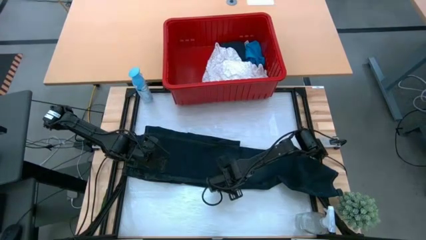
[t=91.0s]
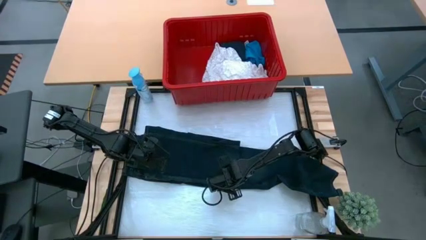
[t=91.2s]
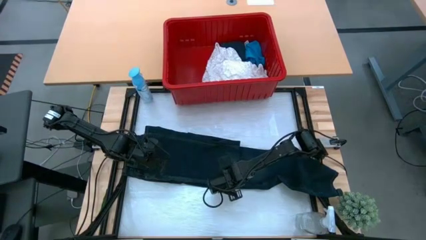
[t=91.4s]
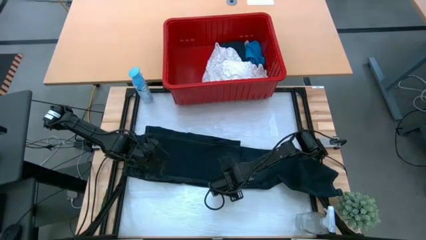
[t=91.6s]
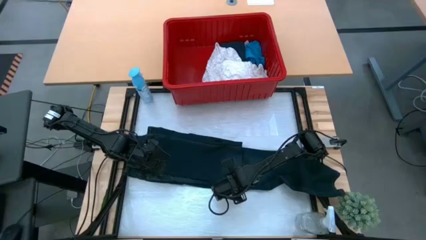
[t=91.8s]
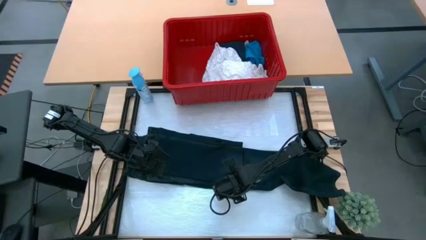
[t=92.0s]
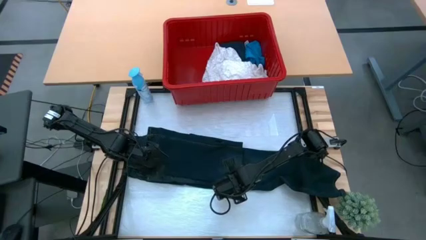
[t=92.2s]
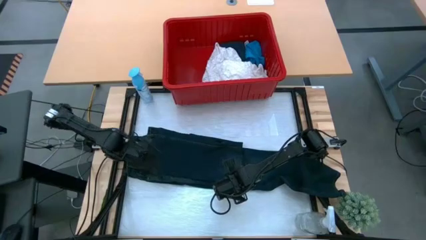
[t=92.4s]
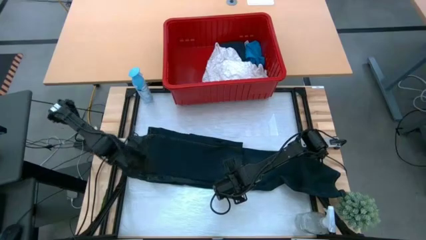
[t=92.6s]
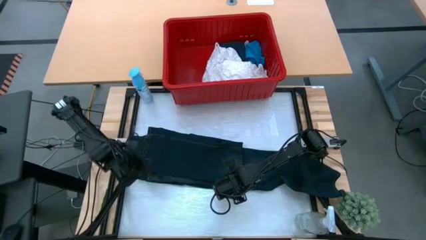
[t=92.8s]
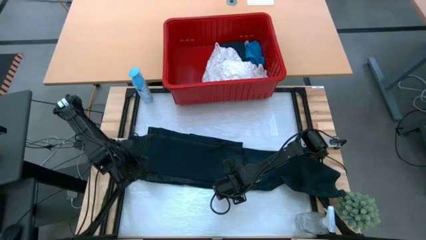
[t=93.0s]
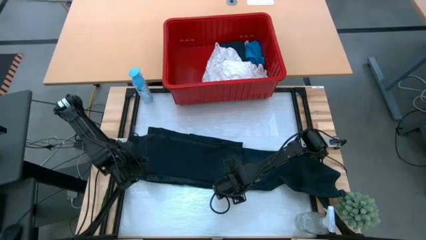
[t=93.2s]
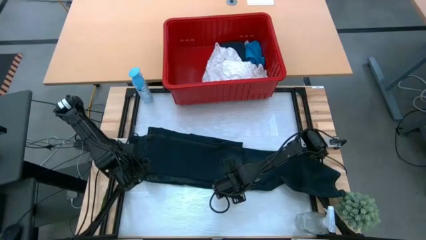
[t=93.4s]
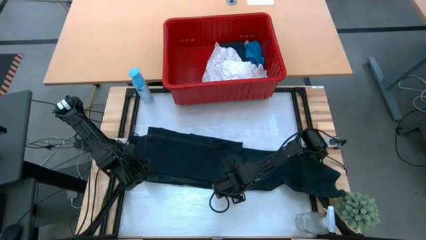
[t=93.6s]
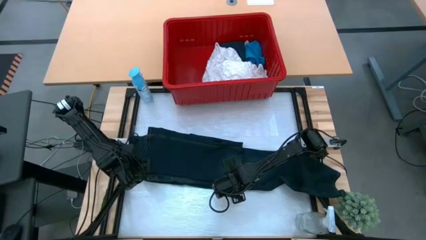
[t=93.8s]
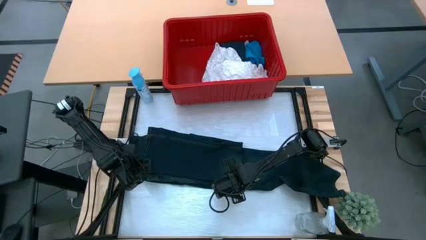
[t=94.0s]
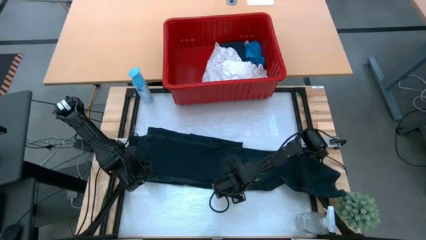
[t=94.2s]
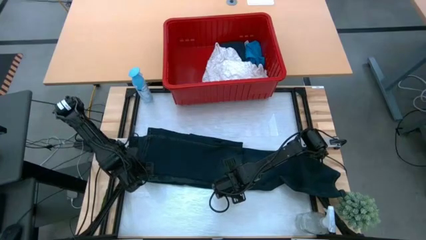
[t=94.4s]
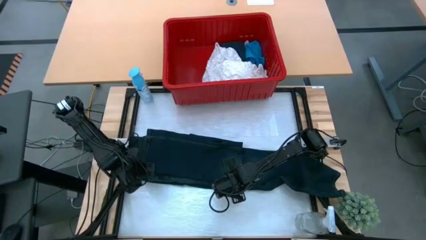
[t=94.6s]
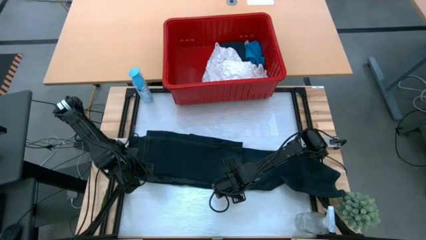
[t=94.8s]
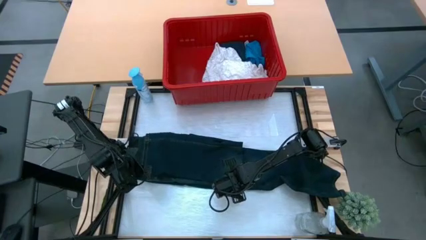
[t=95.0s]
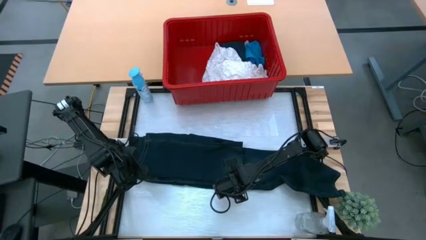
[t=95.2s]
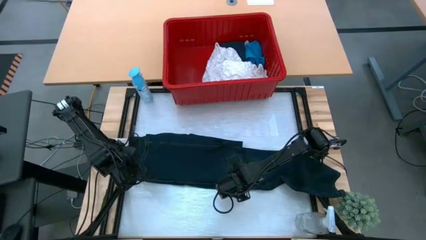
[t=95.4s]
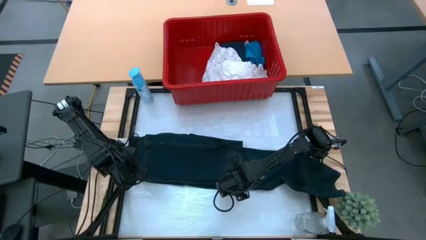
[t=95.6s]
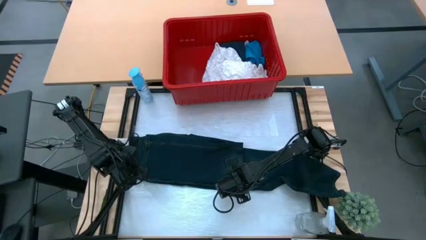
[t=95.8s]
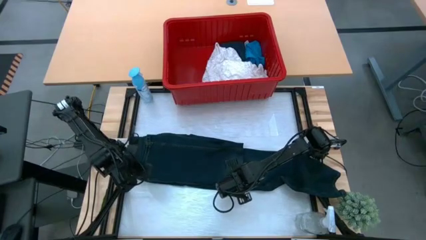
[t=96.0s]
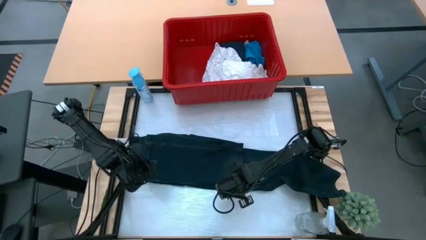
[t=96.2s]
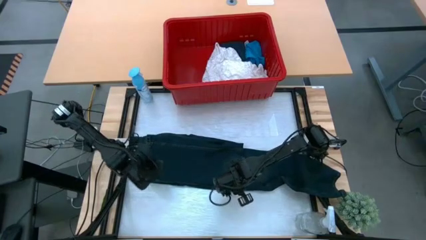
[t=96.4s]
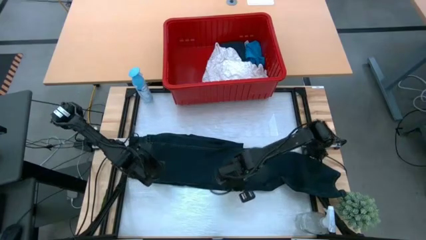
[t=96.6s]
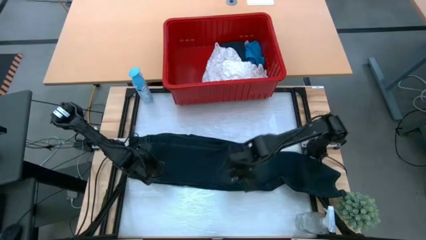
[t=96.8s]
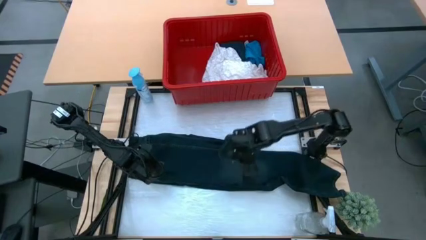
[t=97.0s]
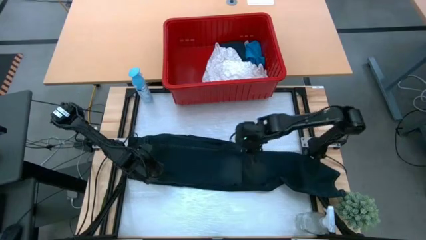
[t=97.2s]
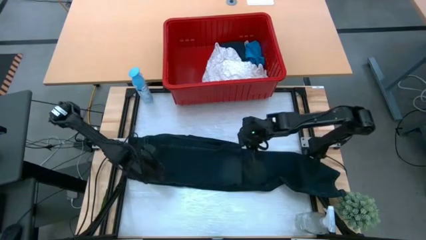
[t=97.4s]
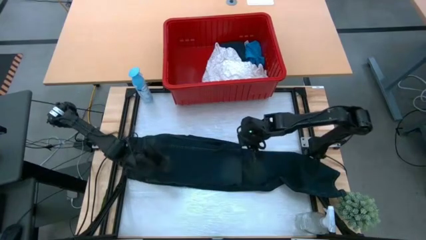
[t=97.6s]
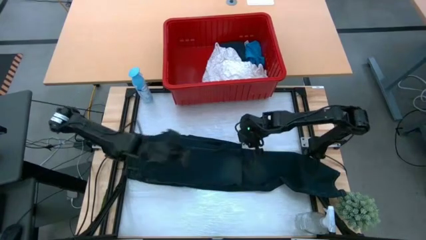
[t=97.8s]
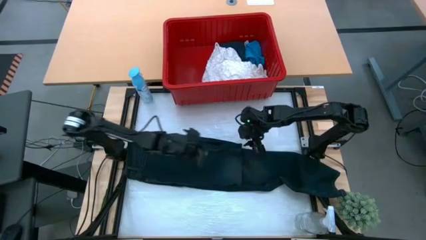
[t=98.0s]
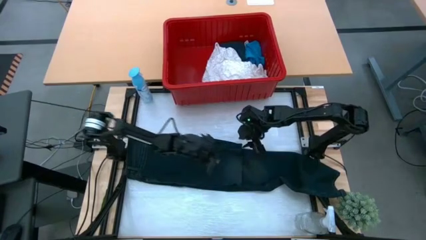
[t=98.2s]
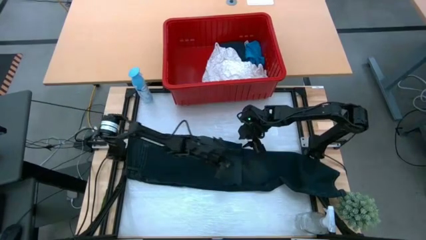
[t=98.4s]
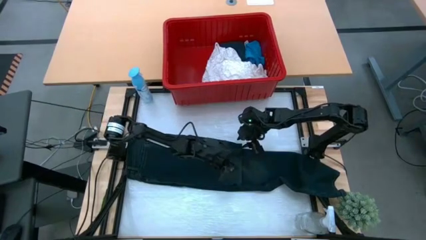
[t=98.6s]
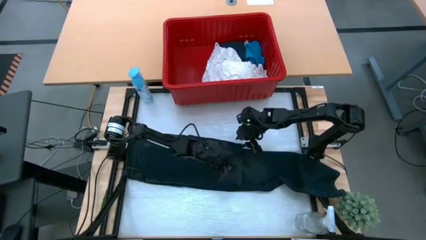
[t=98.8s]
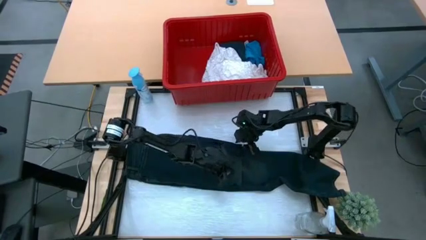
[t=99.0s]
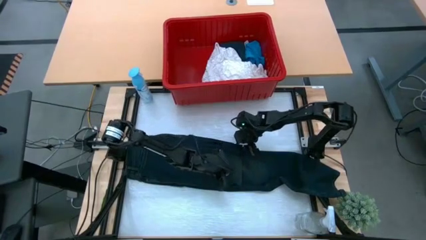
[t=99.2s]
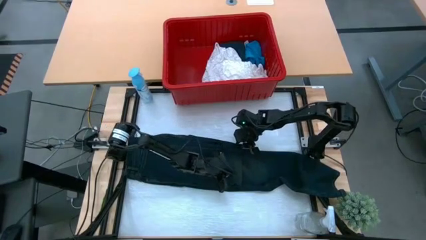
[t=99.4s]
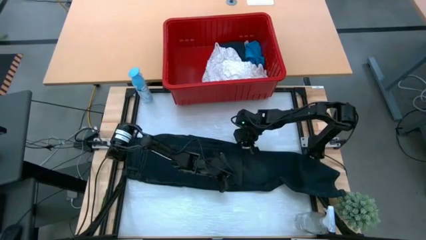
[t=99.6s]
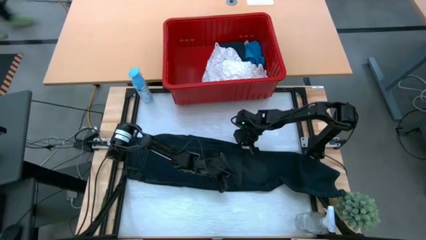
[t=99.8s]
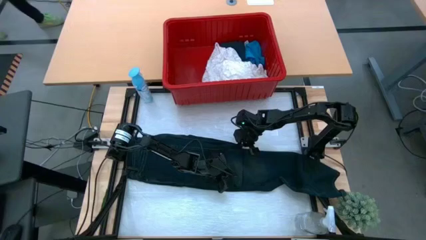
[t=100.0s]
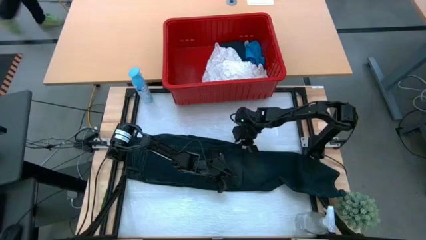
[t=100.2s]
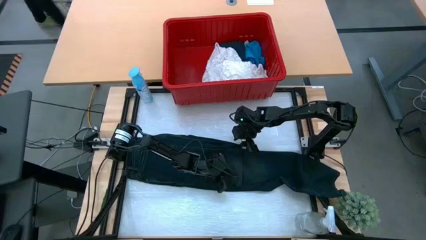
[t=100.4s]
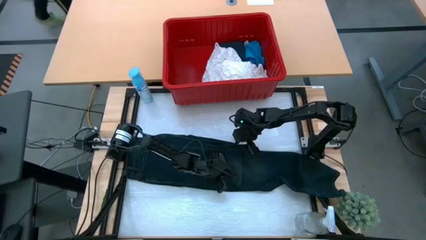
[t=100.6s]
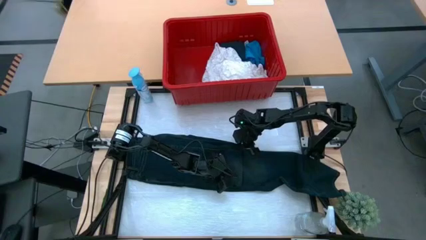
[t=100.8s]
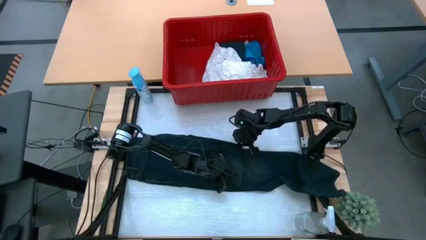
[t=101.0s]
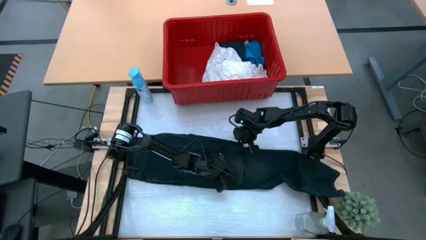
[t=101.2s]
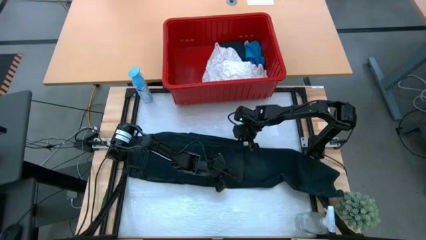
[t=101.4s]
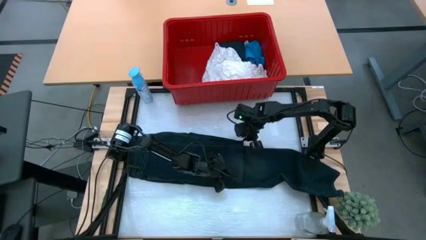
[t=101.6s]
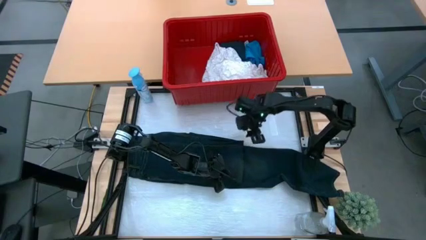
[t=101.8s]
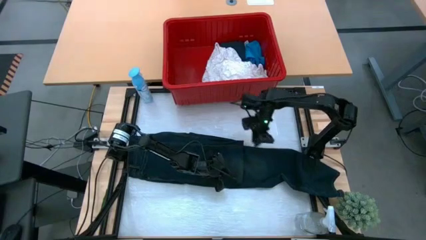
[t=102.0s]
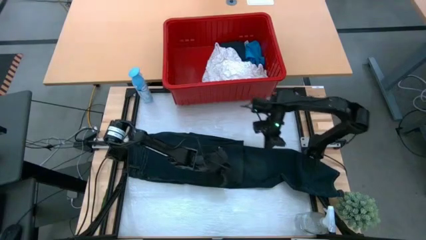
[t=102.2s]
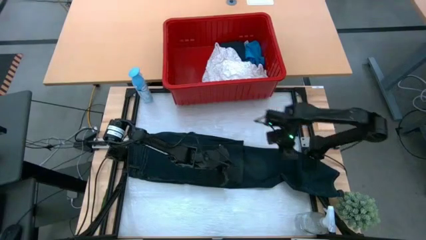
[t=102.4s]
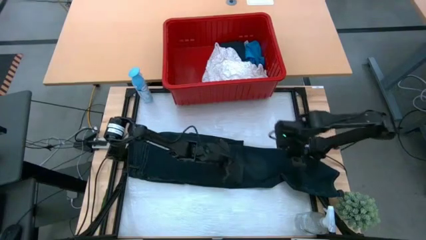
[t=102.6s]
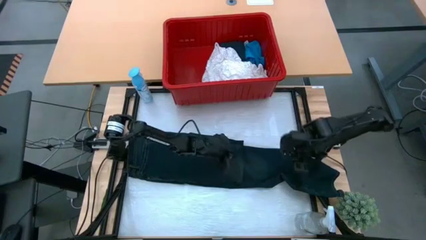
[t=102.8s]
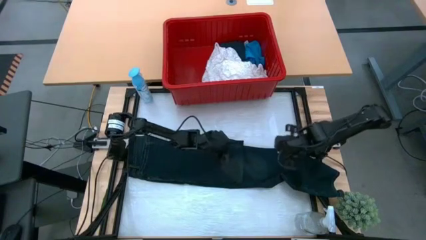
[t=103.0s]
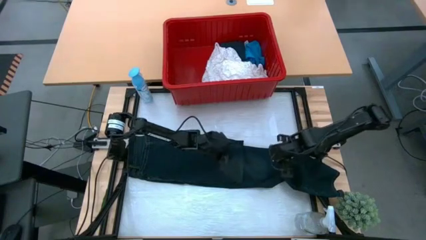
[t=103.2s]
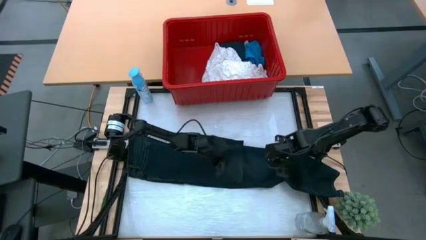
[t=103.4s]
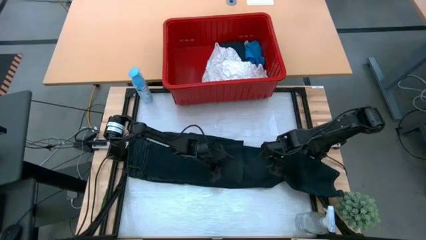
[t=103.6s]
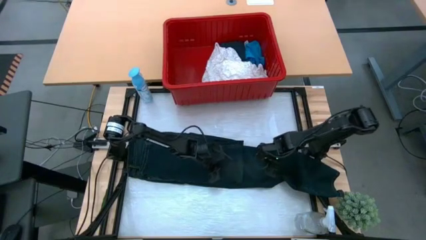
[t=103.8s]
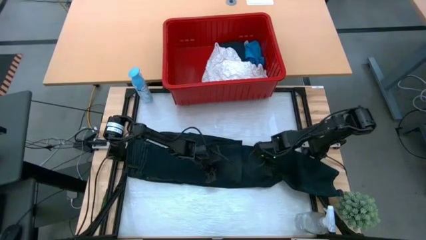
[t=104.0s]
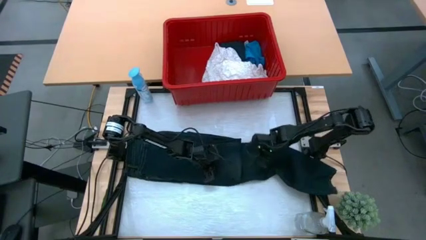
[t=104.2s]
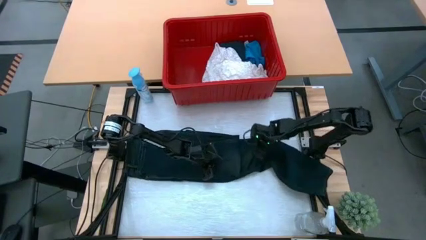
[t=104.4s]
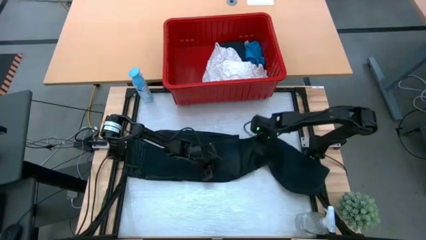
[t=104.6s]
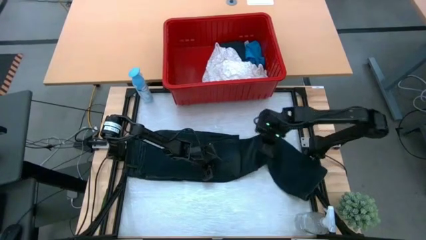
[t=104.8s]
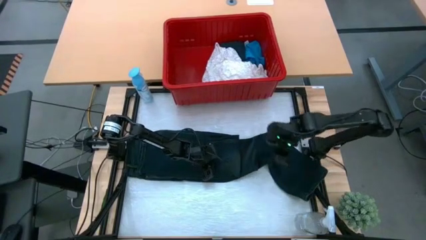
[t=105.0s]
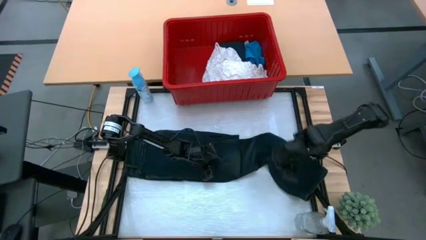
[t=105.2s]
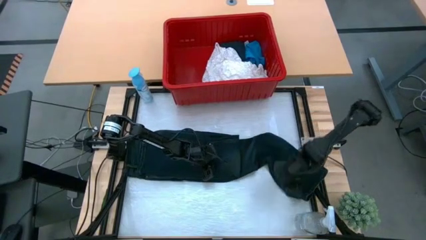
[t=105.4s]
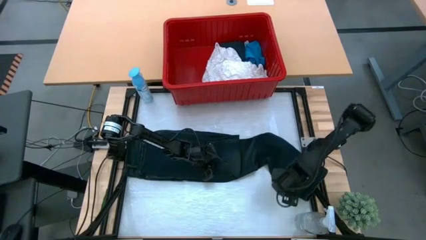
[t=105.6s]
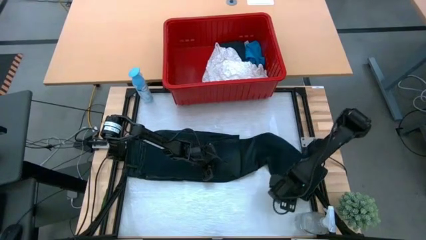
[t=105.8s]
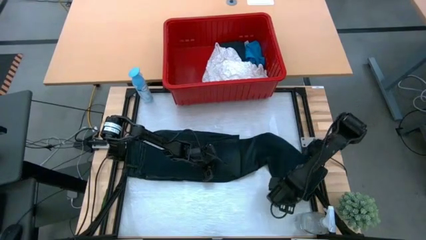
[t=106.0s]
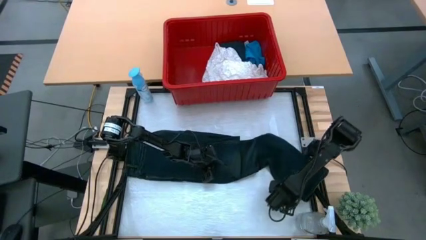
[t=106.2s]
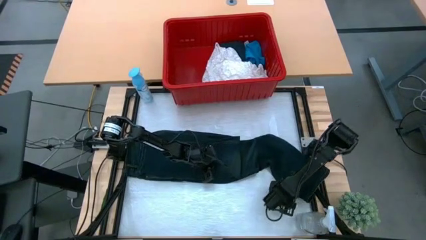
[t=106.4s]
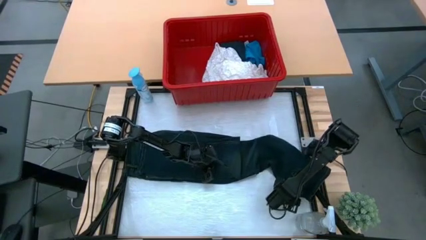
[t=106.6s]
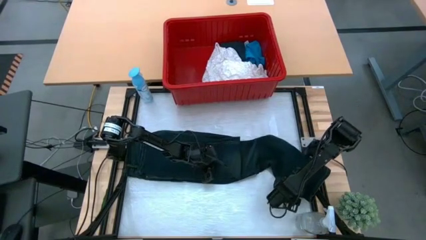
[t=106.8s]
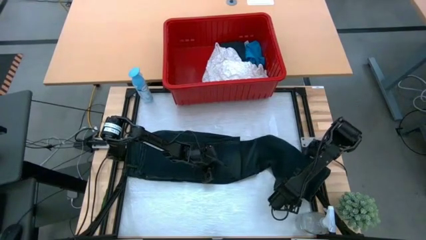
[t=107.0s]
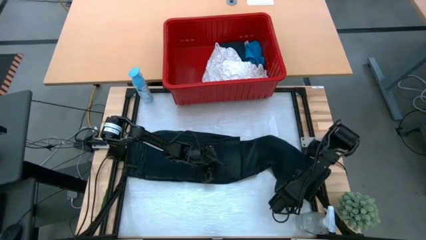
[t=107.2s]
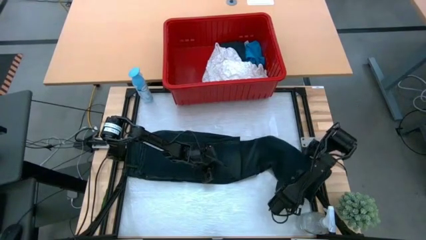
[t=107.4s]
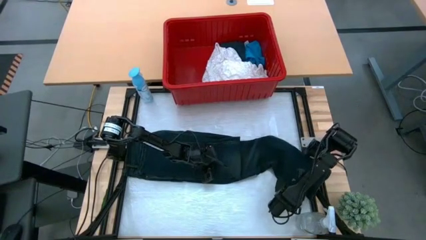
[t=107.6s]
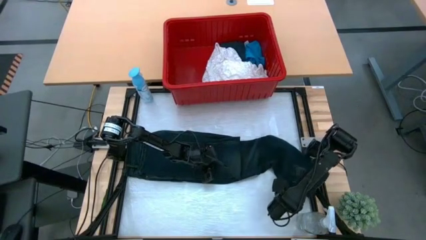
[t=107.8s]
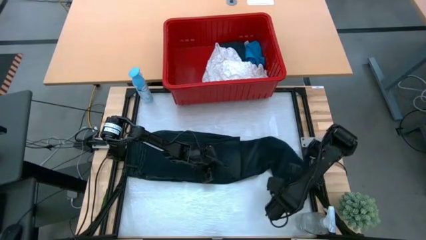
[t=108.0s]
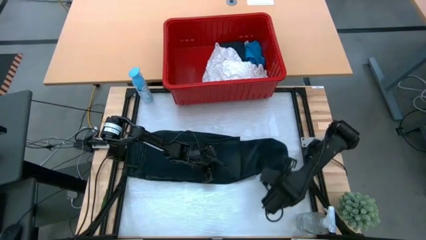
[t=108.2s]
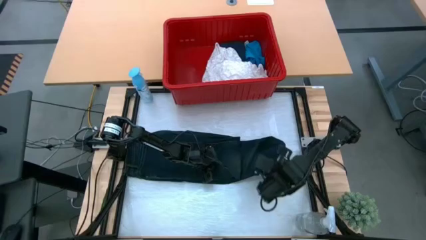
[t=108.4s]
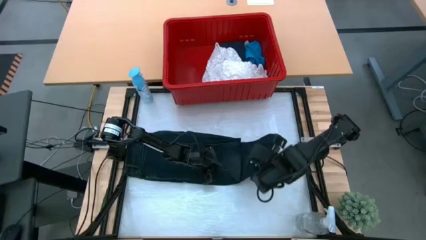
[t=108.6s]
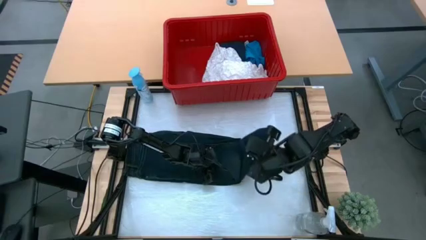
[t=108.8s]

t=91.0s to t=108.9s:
Task: Fold Laundry from Bin
Fold the black pants from the red bin
